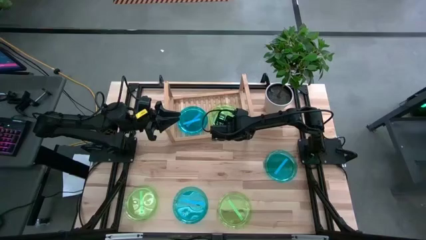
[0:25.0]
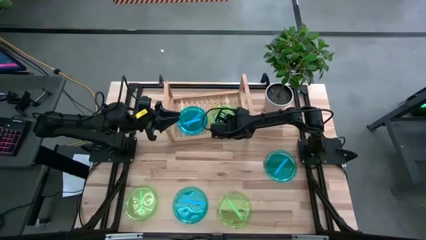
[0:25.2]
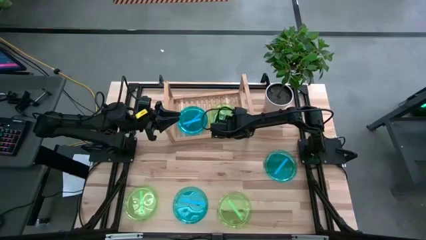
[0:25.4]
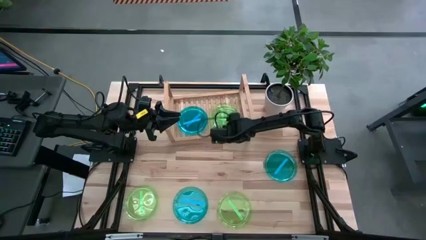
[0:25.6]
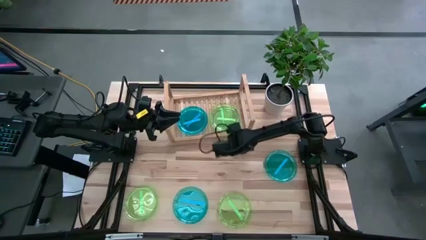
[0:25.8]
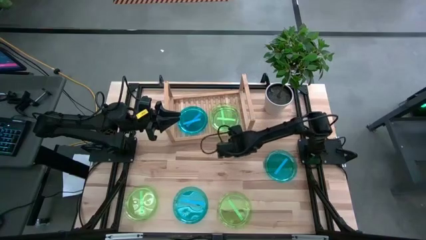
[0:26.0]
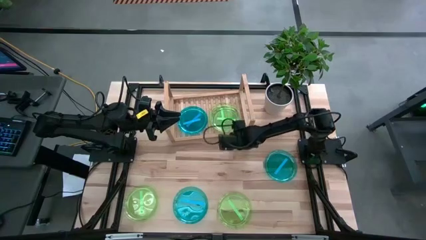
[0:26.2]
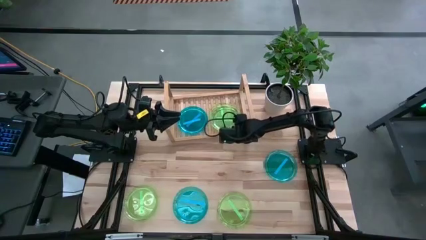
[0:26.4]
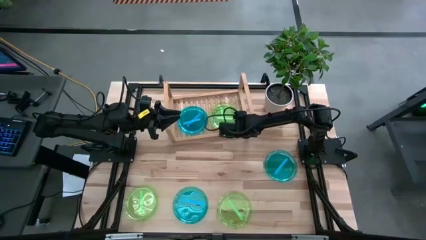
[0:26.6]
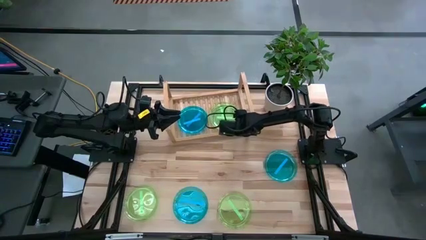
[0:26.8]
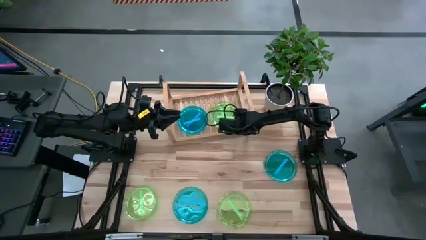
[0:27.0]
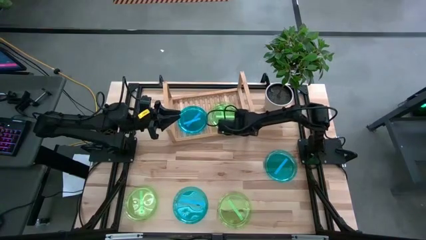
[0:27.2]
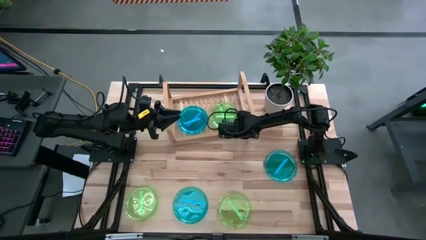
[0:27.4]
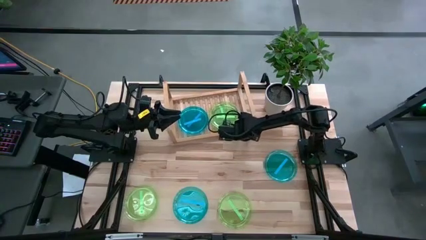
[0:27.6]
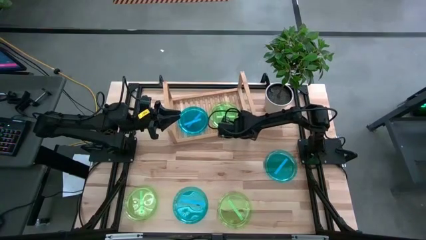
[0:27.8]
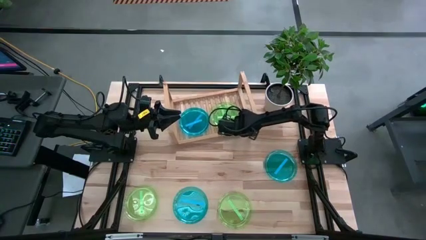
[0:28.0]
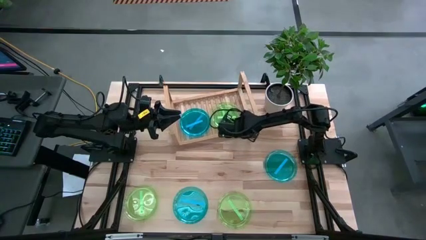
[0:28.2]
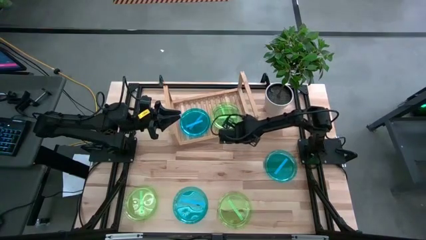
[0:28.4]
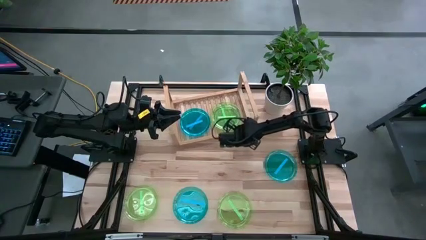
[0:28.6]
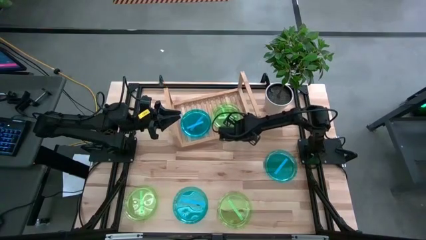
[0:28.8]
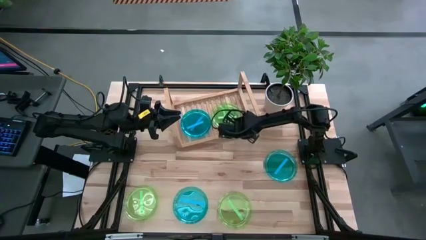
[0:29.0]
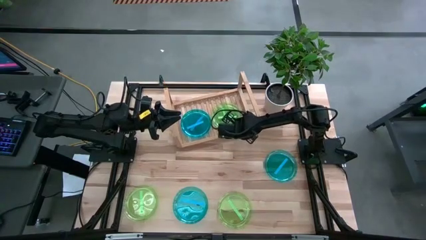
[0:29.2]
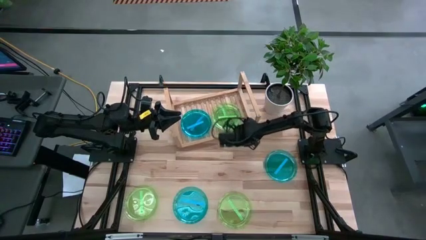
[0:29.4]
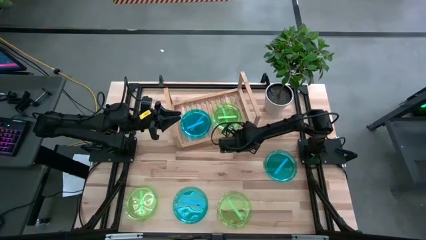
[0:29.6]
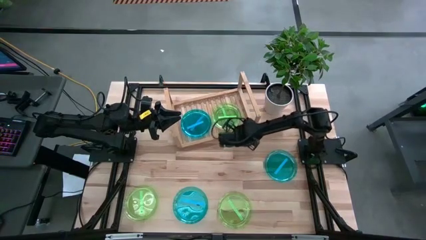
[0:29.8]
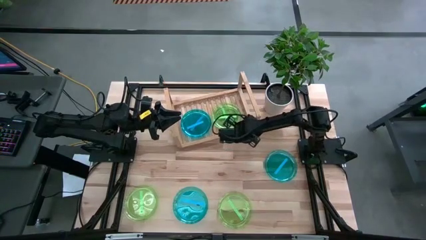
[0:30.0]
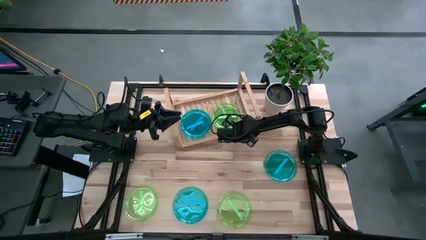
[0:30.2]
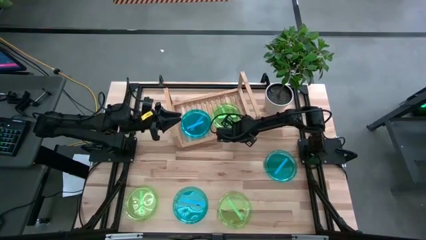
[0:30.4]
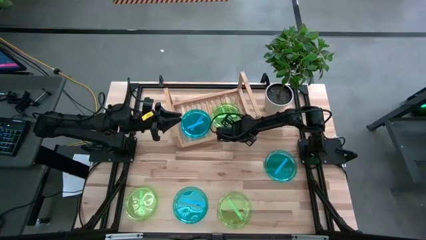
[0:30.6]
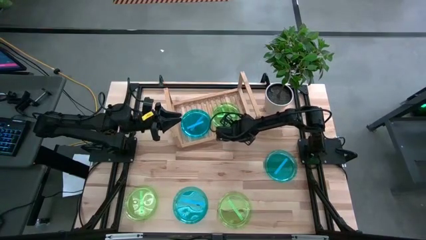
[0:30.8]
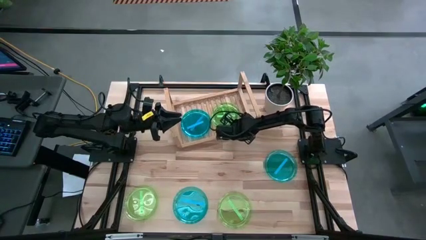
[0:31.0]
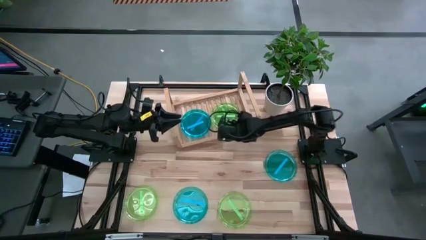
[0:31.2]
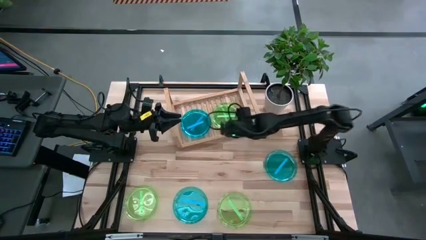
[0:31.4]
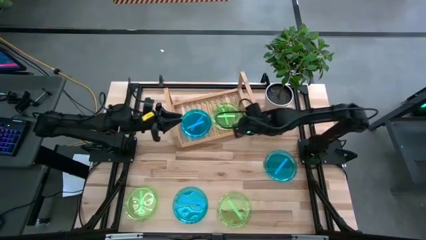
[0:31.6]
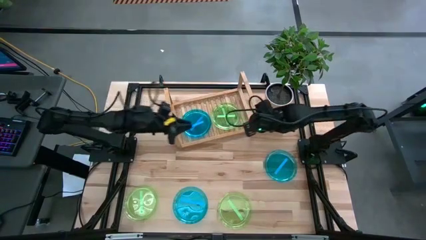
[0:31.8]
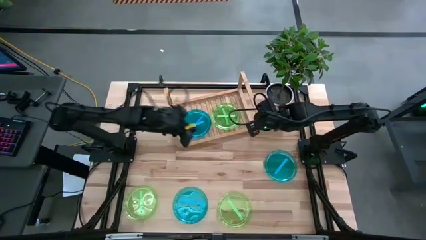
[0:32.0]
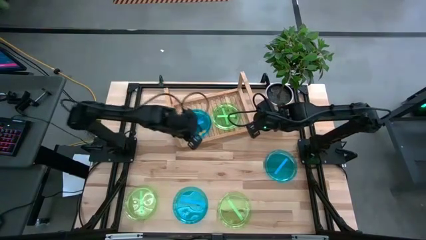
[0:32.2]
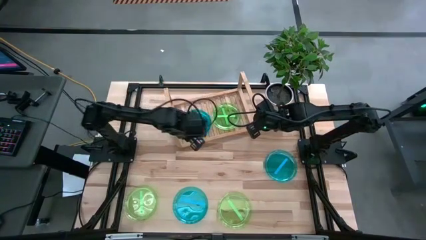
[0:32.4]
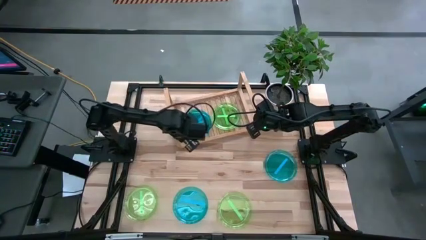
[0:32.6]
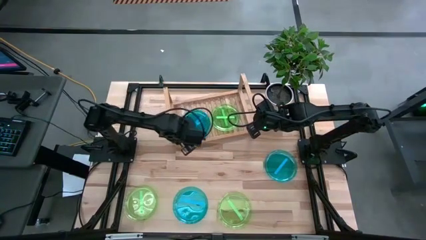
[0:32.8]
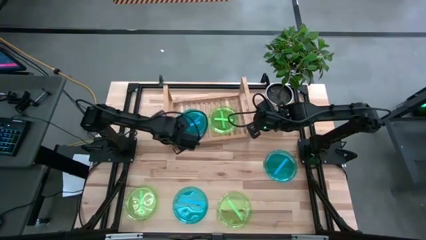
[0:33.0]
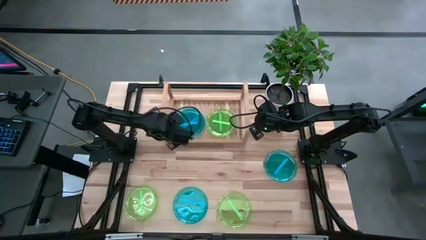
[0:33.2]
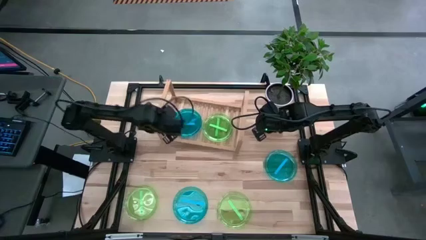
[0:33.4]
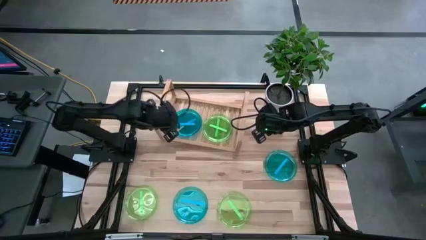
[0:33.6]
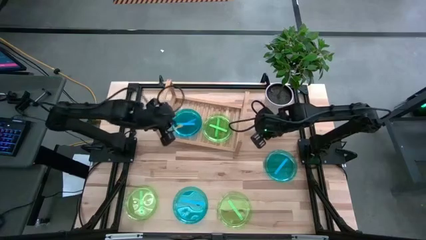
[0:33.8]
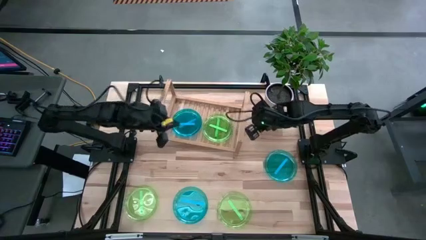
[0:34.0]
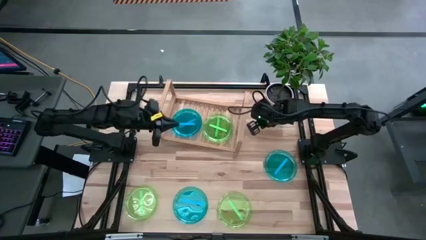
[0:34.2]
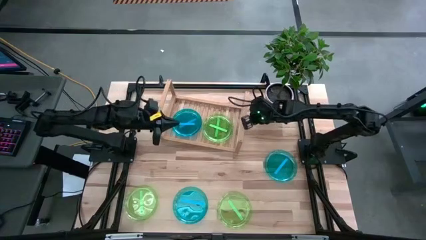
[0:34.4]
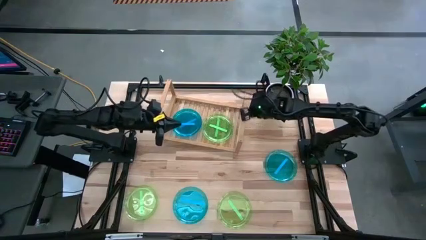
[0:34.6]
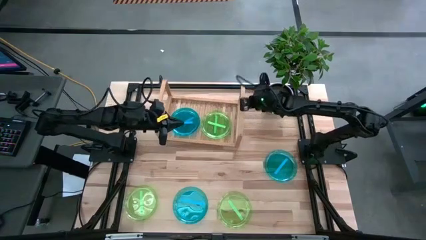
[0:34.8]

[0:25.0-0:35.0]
Task: Place and stack plates onto a shelf
Adjust the shelf

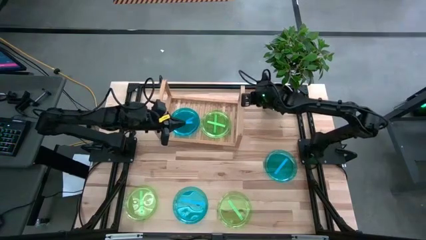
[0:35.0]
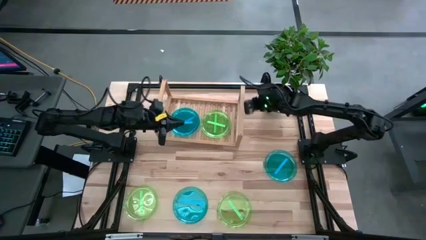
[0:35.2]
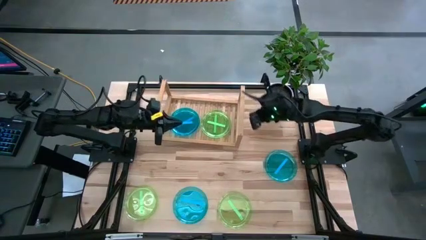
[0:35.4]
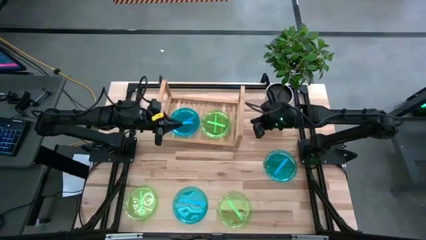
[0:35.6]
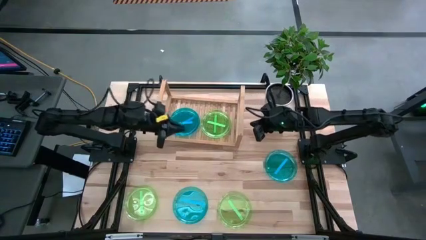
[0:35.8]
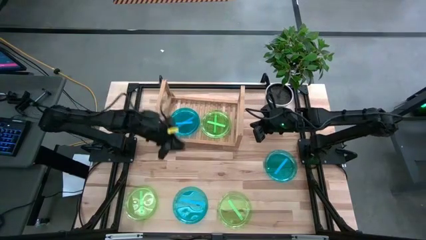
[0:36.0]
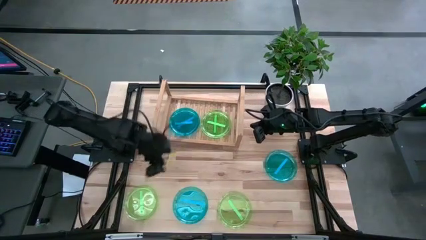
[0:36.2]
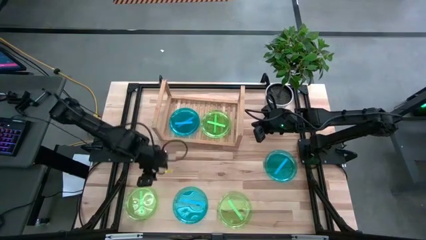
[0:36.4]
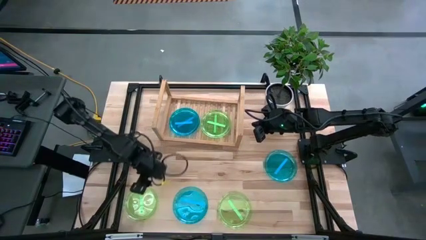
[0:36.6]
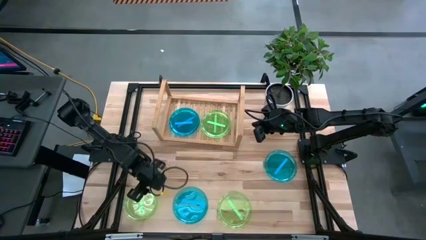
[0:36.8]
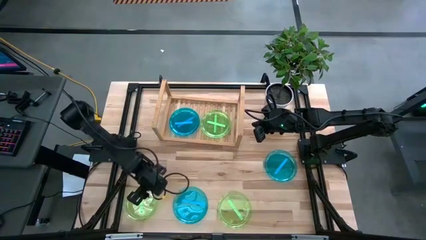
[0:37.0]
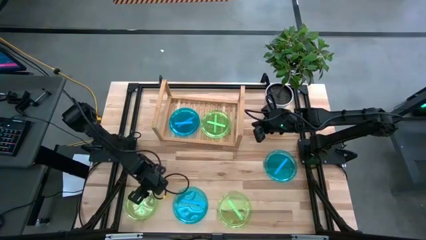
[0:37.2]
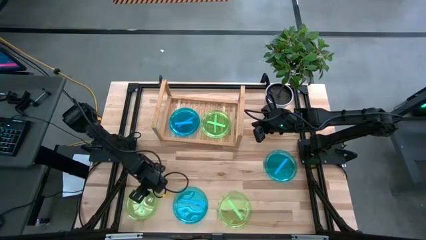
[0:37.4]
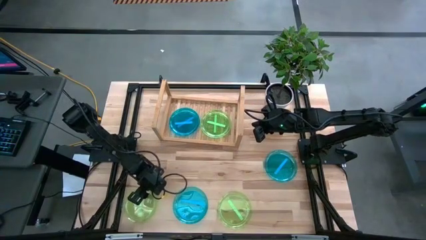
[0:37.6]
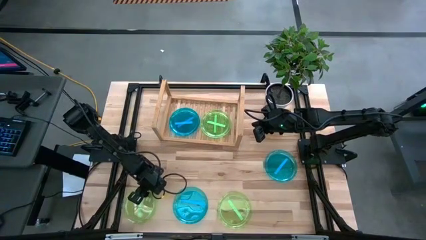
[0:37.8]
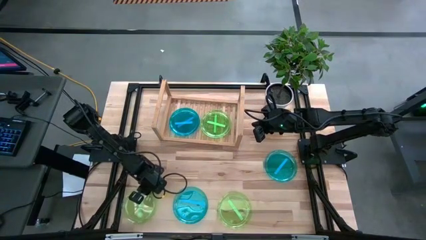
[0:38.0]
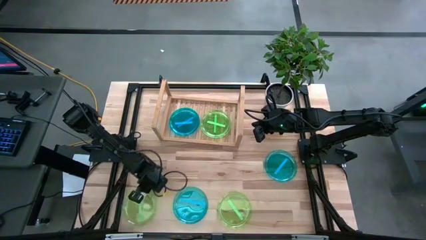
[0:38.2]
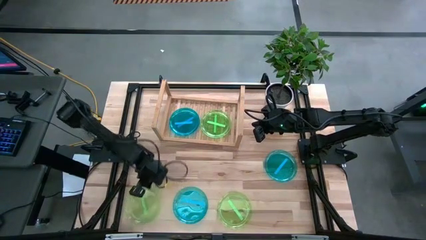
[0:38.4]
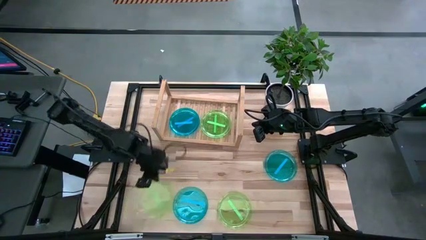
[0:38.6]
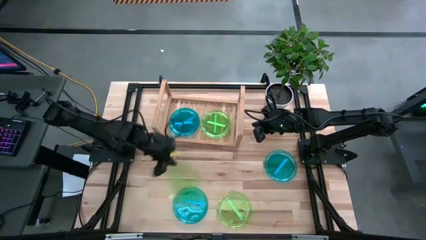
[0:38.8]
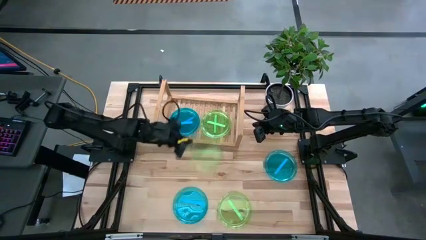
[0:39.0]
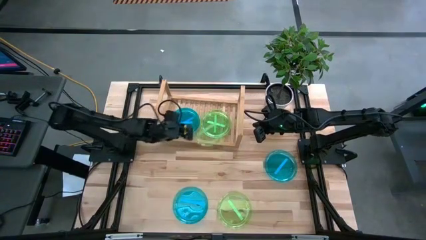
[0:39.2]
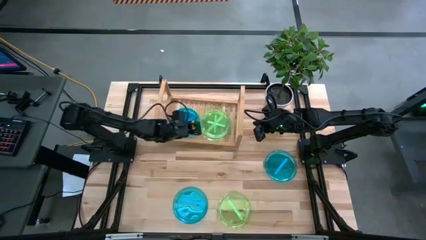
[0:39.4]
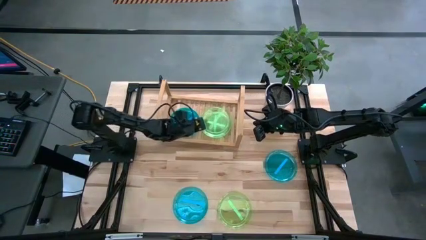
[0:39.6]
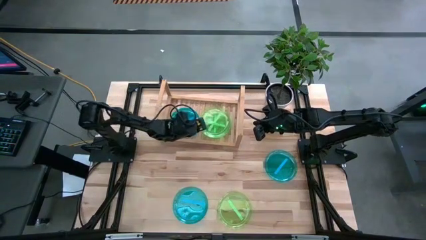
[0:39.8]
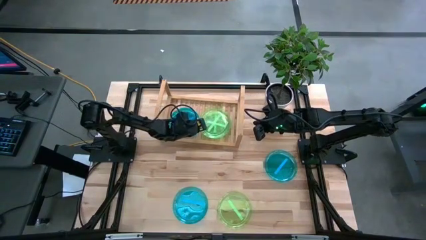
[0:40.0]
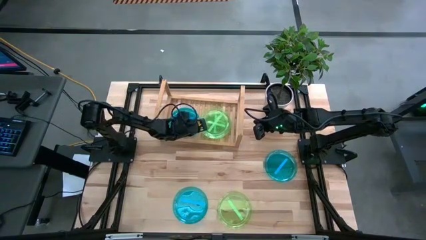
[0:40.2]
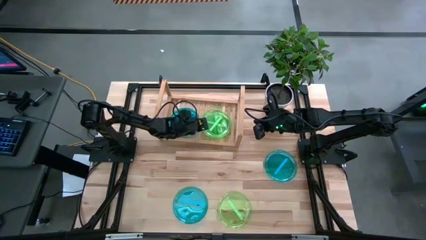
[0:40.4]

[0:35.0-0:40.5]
Stack the left transparent green plate on top of the transparent green plate on the shelf
